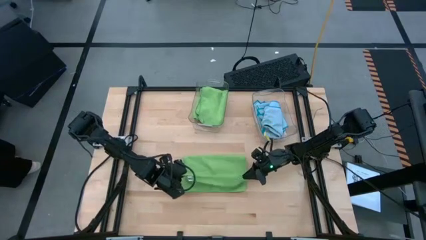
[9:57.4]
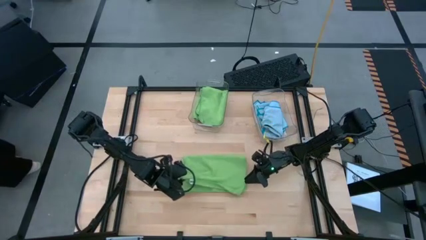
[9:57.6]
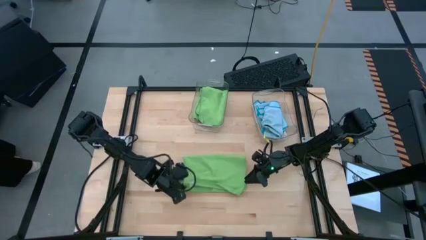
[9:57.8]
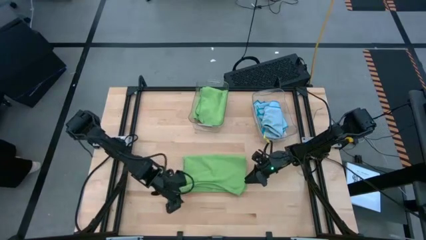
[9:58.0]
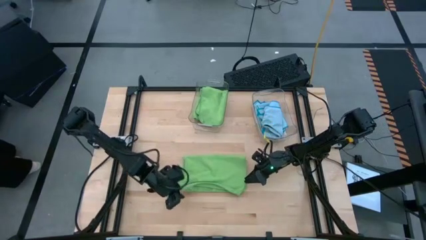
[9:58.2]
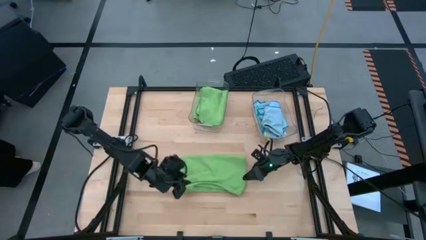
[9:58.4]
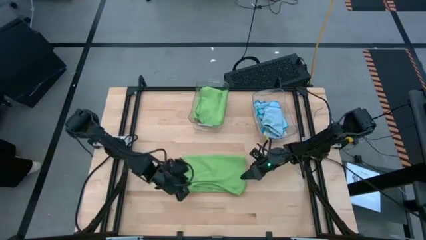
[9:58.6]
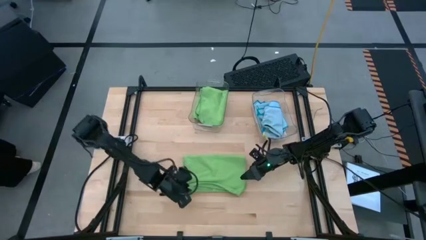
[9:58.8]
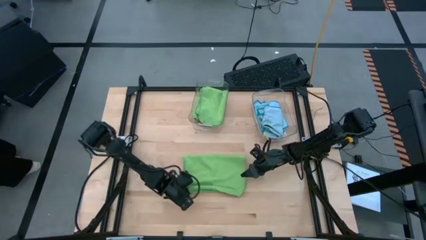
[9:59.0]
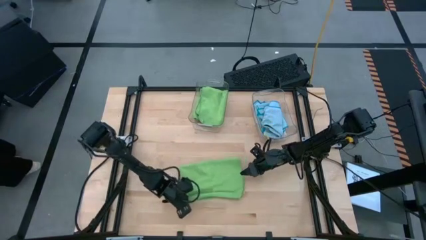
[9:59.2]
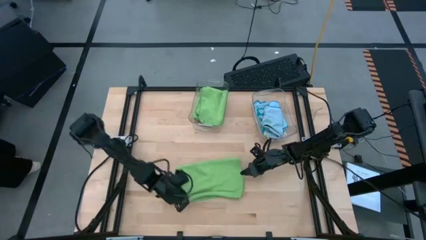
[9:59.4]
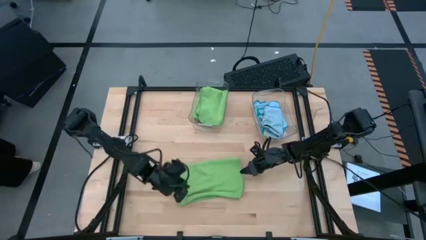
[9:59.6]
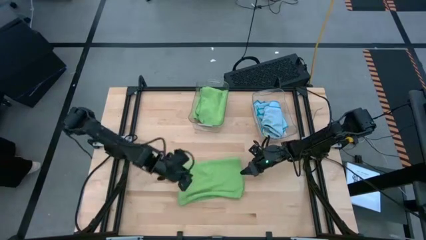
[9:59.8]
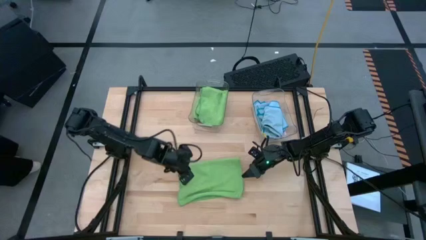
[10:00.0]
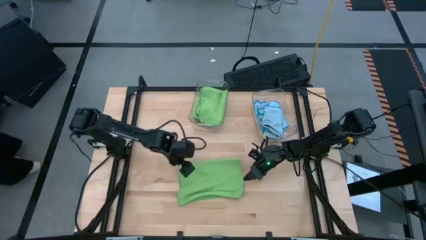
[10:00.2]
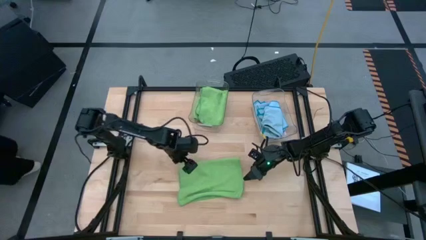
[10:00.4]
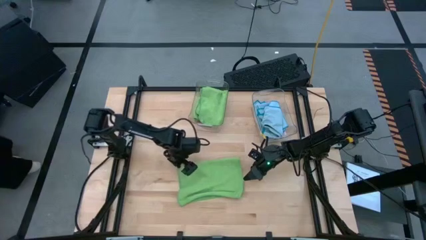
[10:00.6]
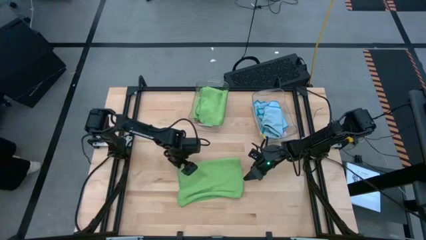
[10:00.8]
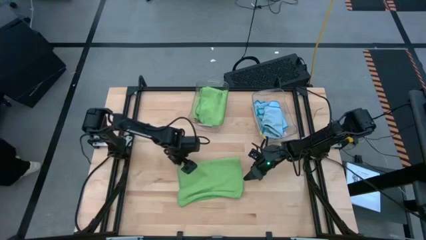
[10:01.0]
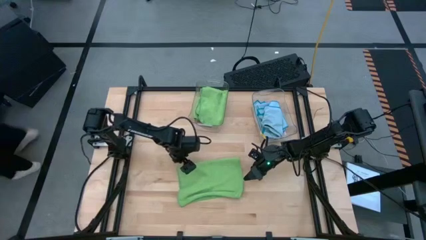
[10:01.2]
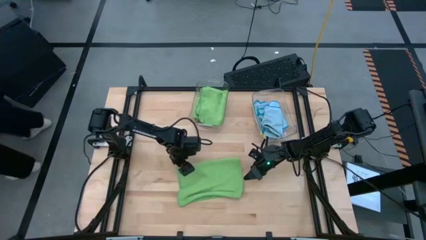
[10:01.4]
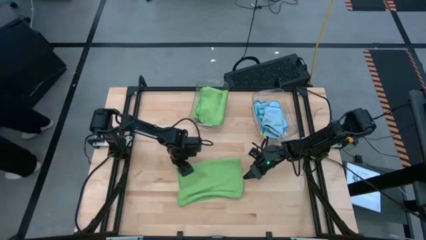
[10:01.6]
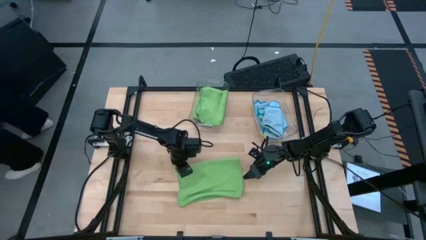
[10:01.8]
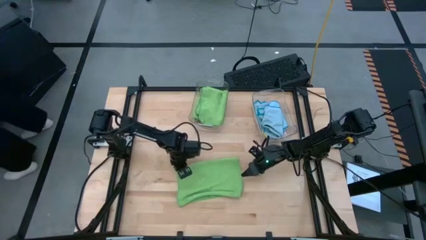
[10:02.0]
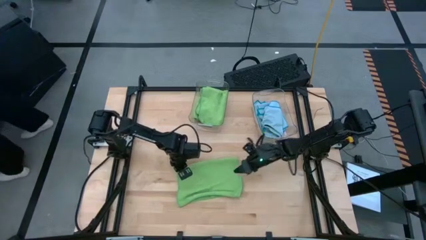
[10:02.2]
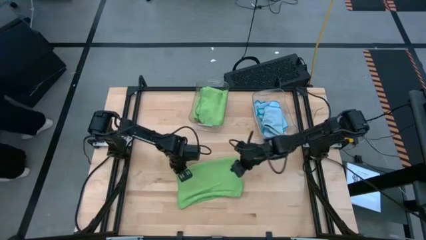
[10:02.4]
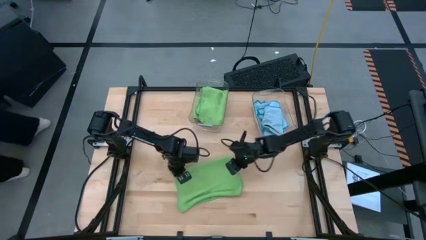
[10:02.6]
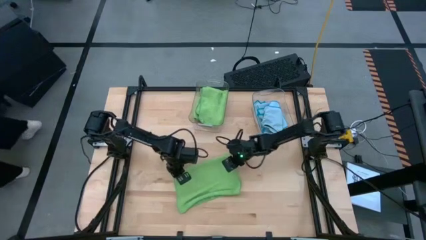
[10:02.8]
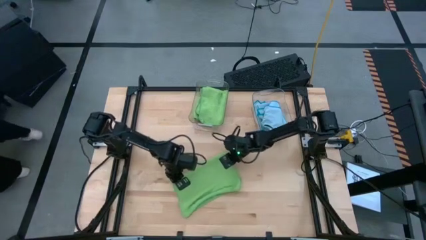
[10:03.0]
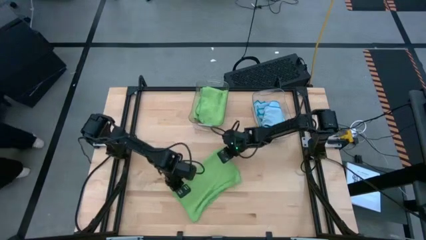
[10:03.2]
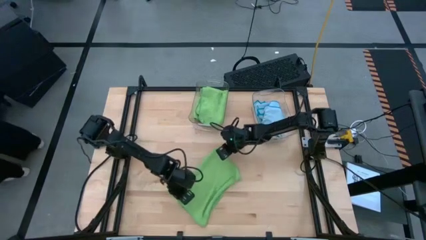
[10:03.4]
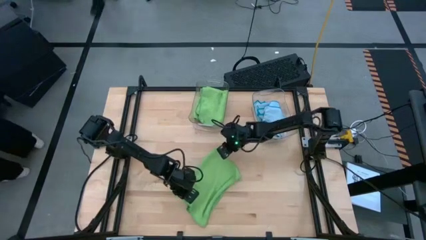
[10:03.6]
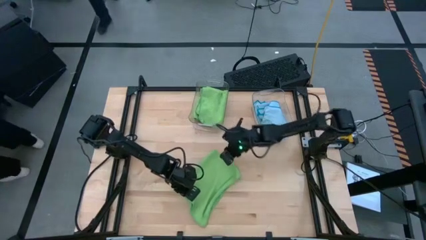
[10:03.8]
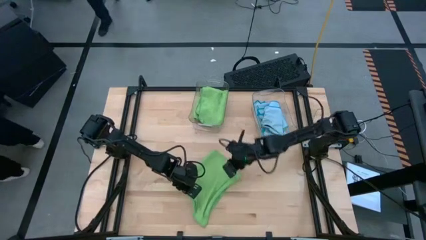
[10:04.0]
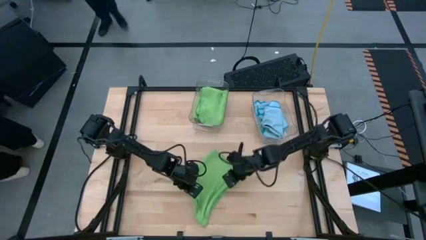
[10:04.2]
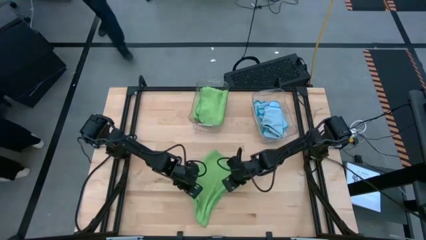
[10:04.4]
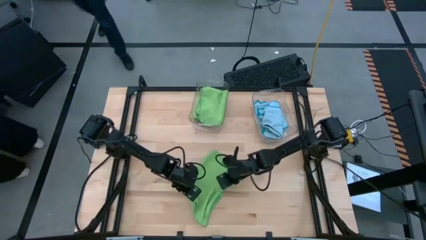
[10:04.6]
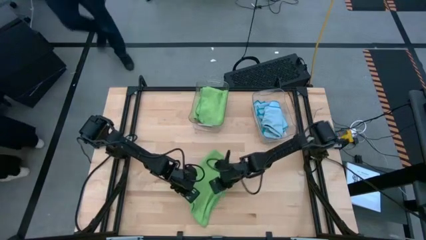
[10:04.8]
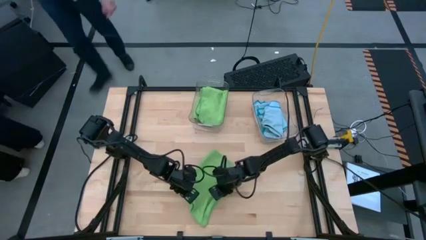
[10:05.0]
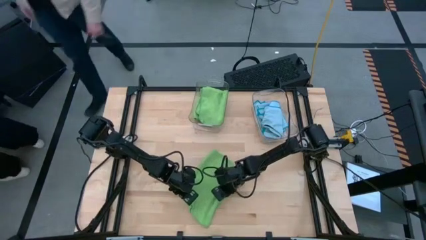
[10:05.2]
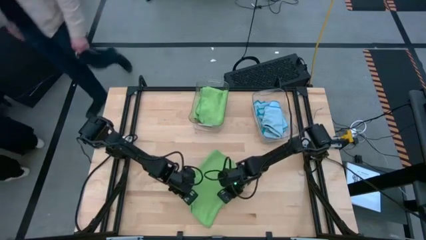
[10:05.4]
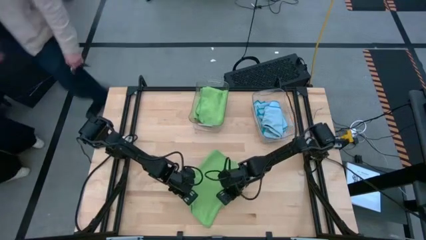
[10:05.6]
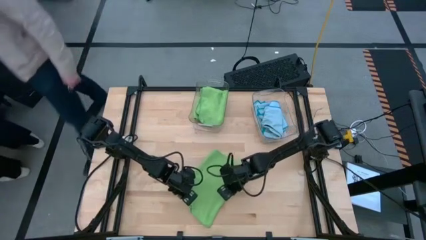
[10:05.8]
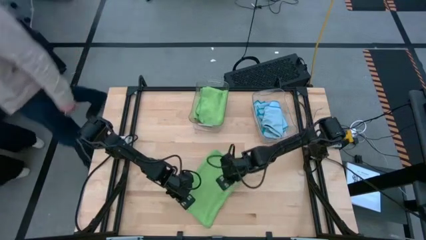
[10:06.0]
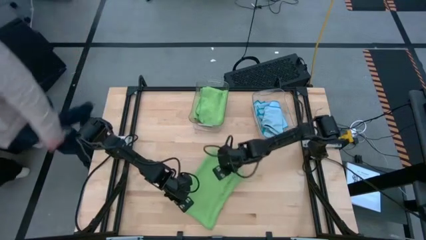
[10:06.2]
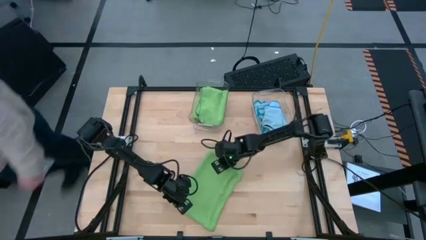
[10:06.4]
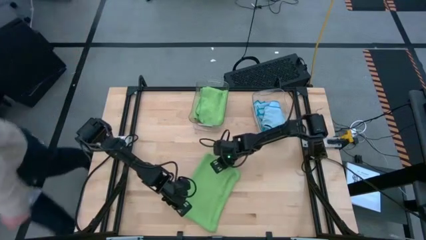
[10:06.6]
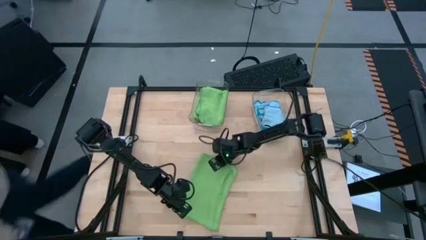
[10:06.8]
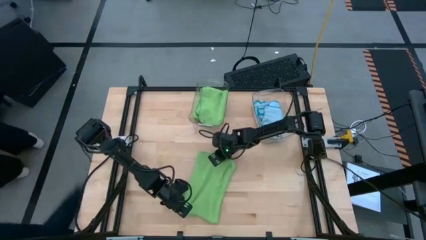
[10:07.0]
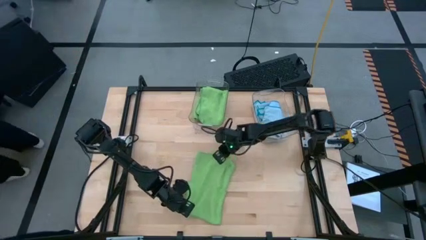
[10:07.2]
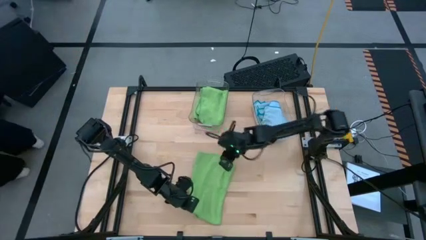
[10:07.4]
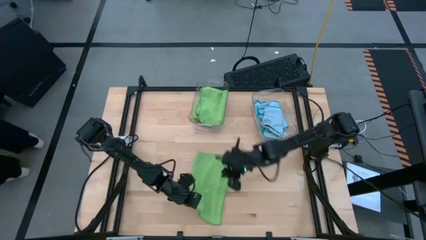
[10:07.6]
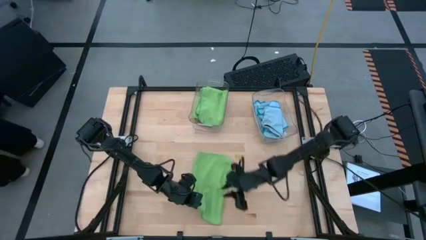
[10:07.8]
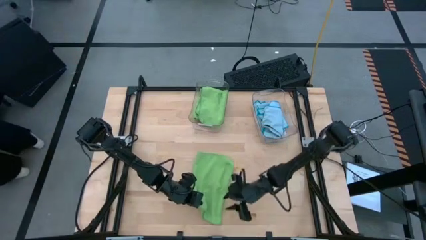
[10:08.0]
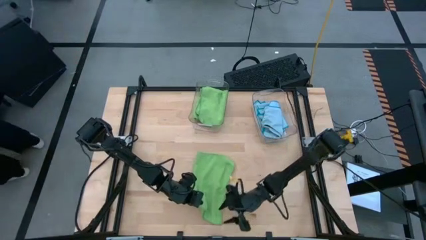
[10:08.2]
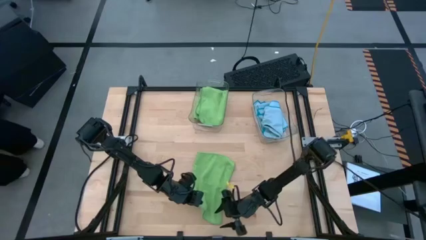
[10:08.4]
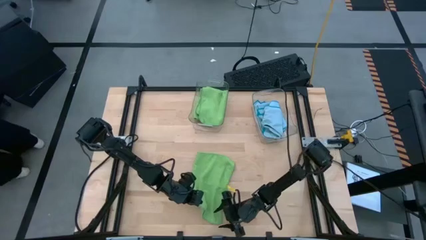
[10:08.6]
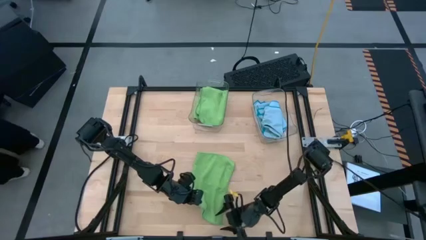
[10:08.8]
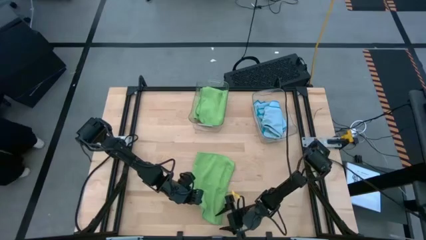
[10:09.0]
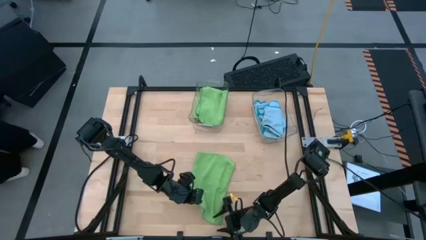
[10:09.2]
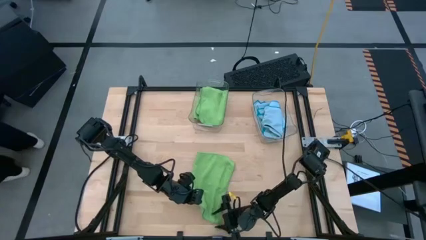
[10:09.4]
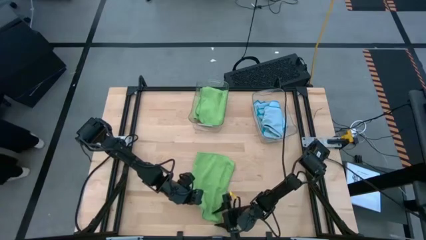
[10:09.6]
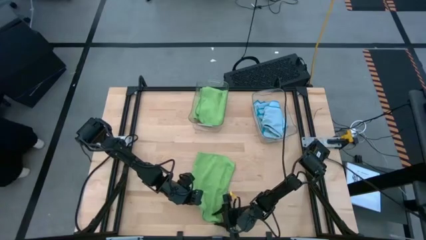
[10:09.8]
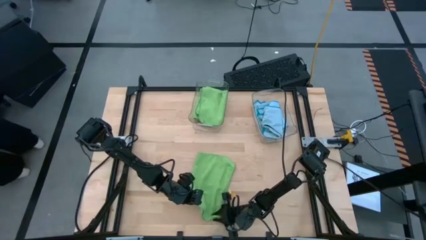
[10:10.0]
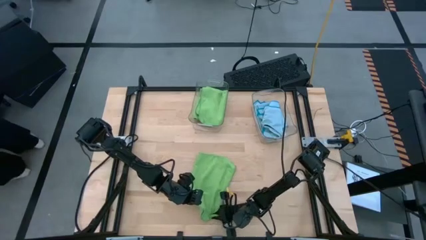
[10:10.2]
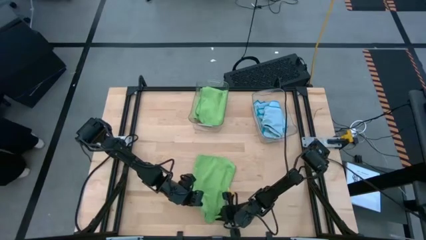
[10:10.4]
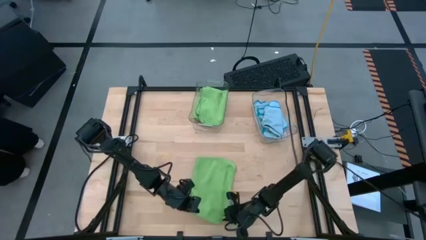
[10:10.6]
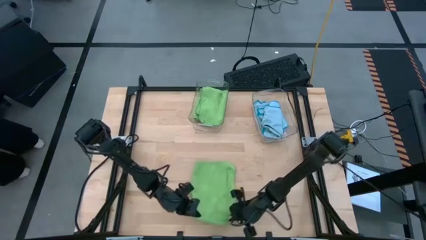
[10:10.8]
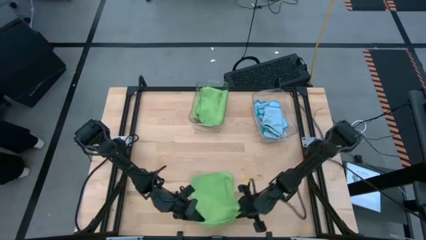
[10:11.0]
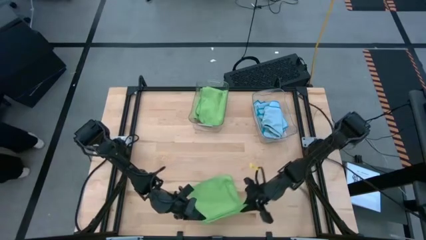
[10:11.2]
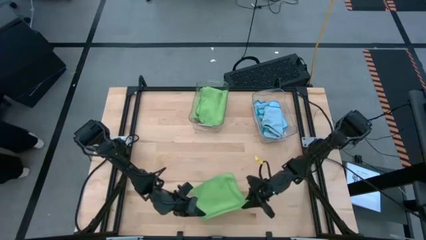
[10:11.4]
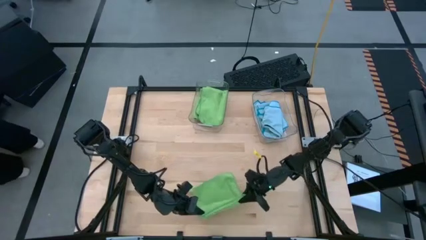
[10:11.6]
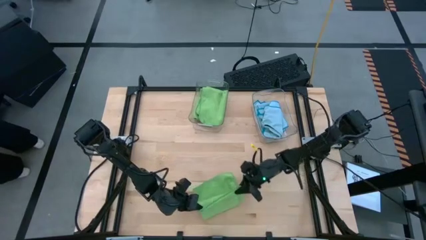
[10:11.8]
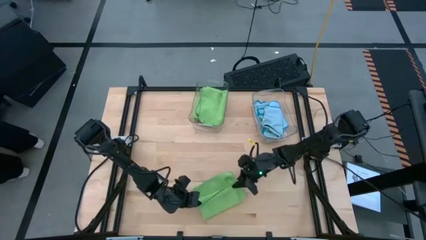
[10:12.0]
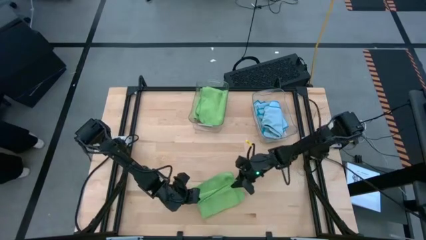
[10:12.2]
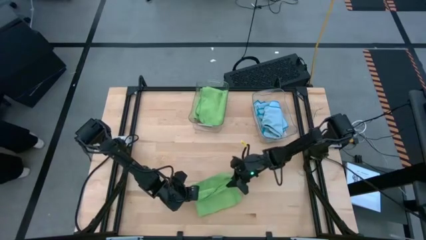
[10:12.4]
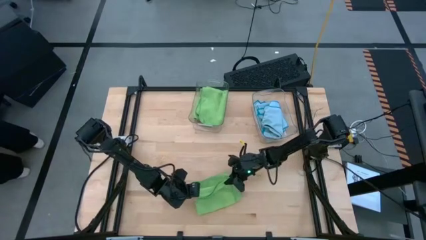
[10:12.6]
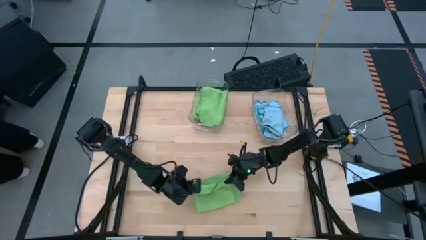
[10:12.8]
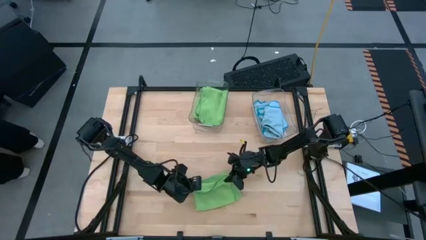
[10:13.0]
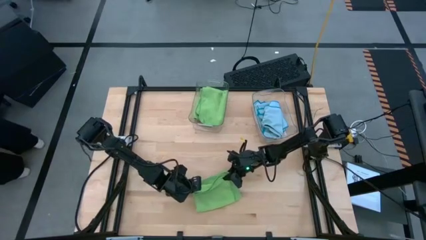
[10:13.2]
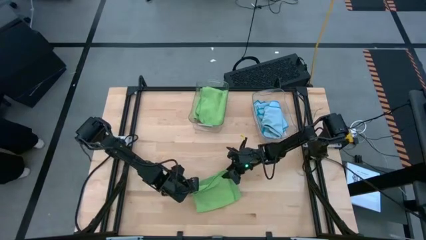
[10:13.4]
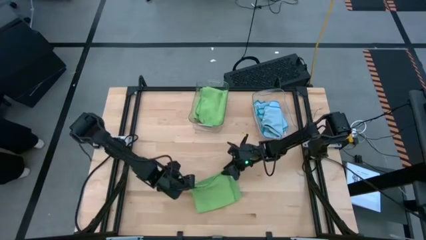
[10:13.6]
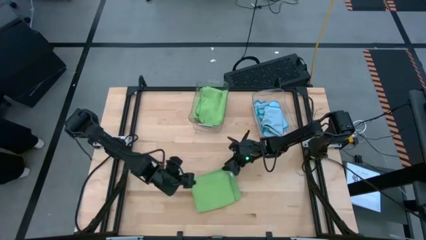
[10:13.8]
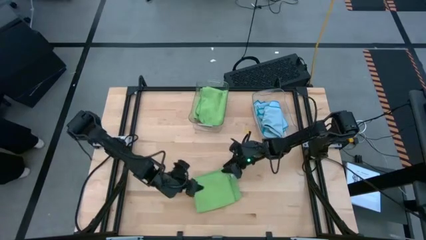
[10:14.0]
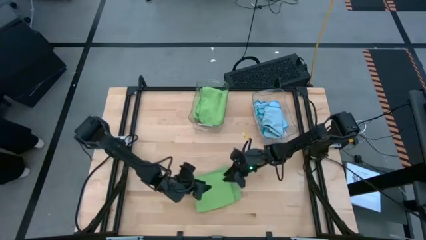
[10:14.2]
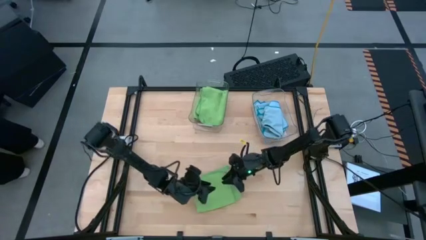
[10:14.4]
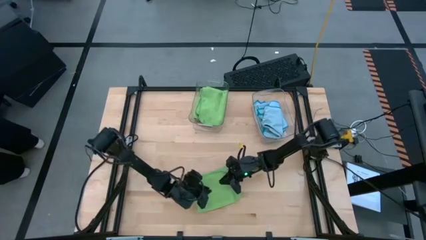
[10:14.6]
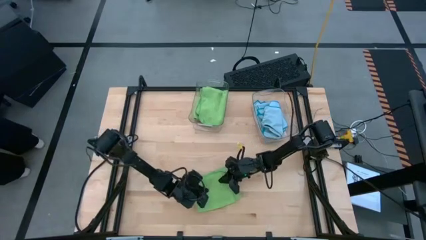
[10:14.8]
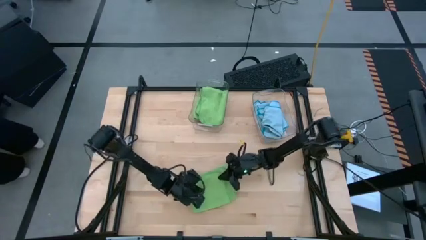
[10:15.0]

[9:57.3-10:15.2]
Task: Fold microfiber towels
Fold the green microfiber towel
